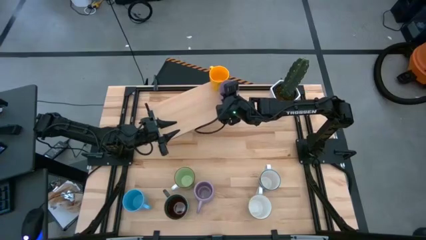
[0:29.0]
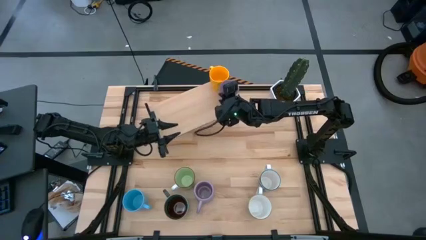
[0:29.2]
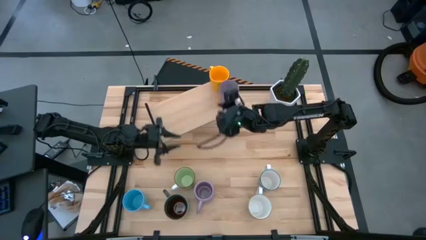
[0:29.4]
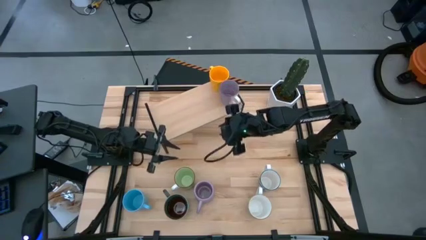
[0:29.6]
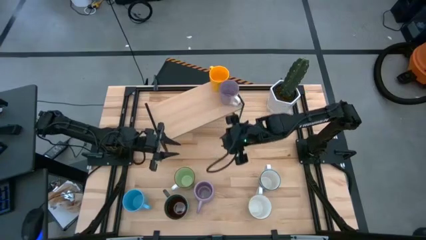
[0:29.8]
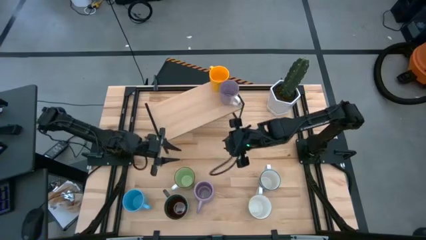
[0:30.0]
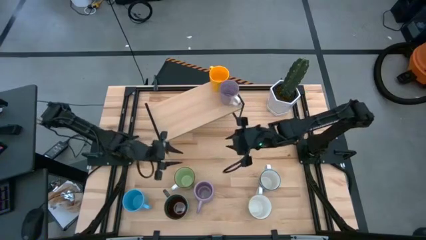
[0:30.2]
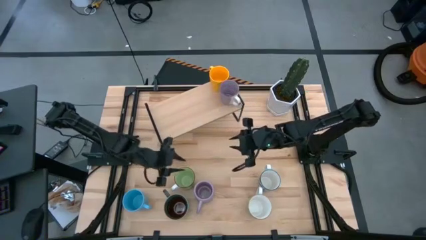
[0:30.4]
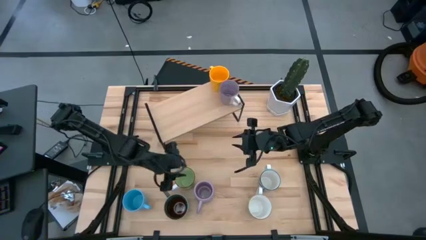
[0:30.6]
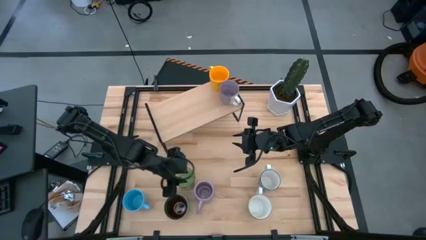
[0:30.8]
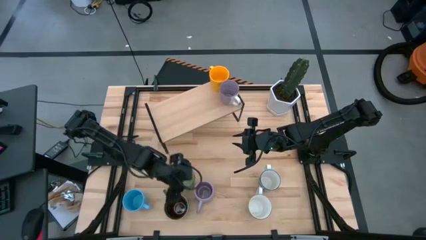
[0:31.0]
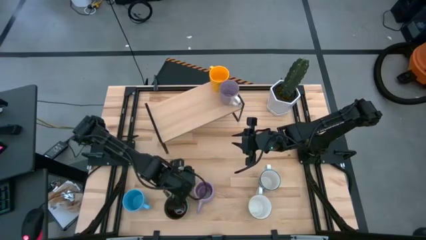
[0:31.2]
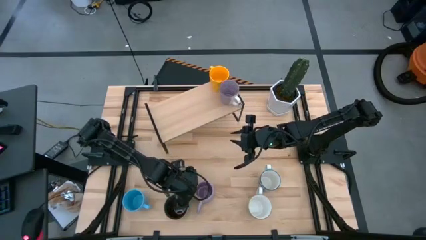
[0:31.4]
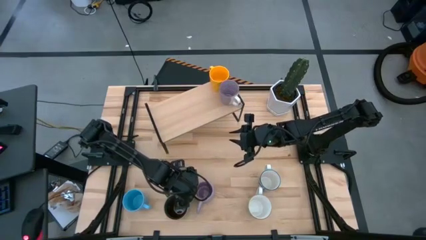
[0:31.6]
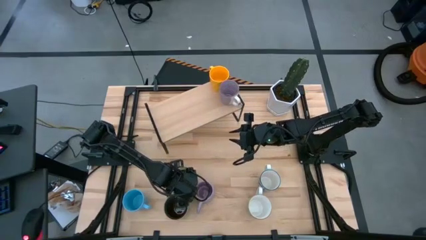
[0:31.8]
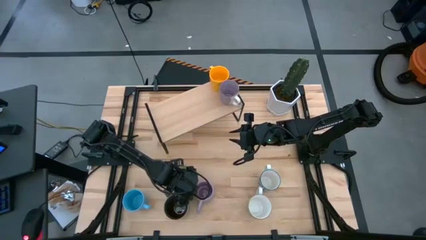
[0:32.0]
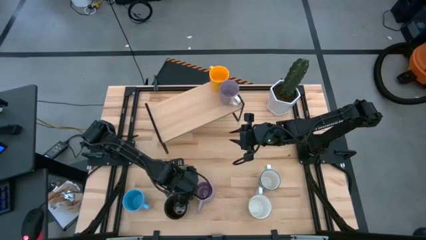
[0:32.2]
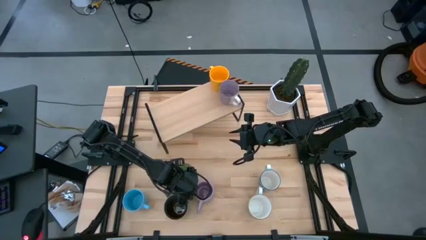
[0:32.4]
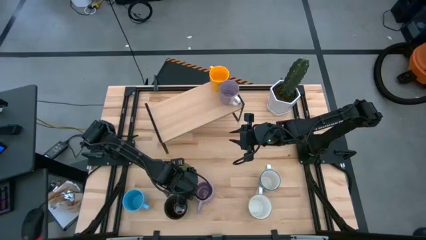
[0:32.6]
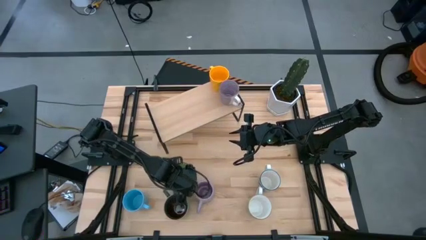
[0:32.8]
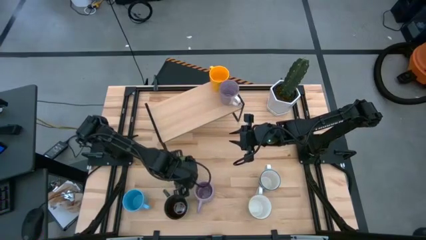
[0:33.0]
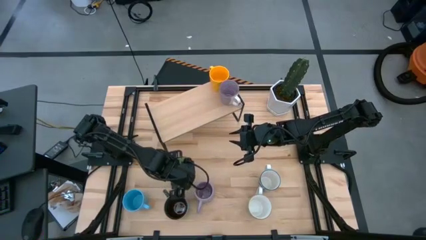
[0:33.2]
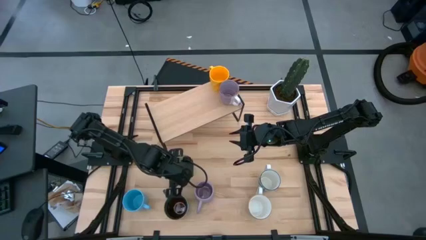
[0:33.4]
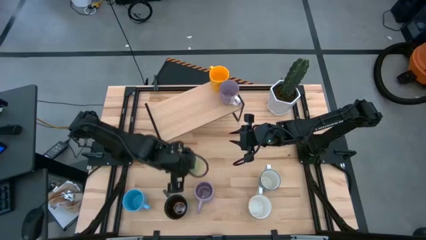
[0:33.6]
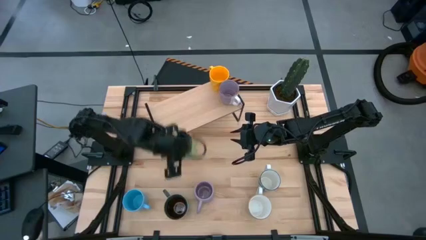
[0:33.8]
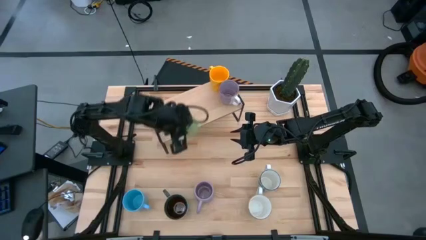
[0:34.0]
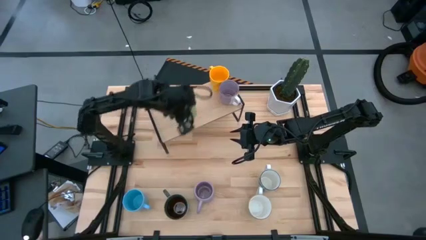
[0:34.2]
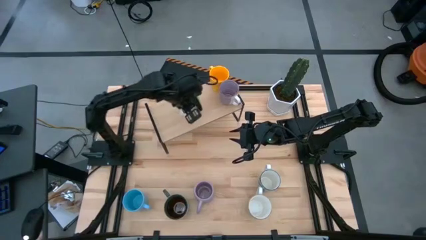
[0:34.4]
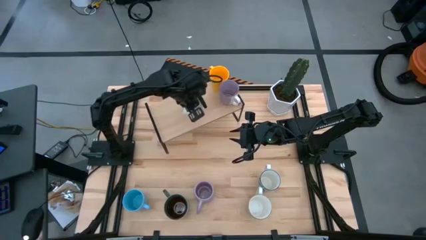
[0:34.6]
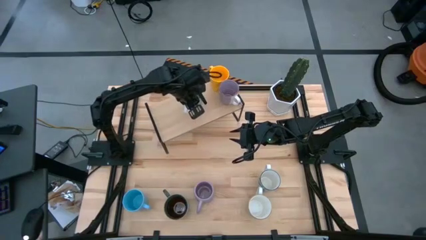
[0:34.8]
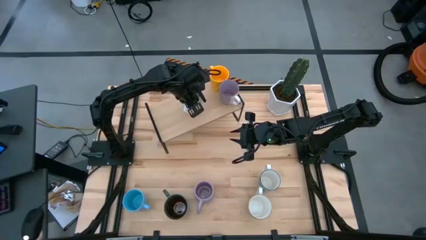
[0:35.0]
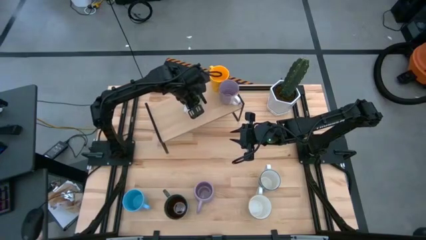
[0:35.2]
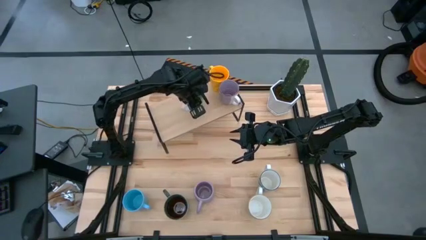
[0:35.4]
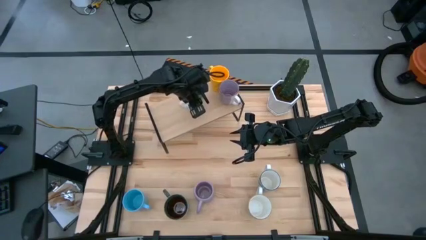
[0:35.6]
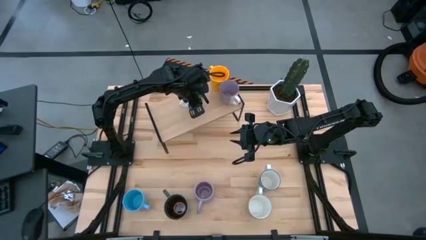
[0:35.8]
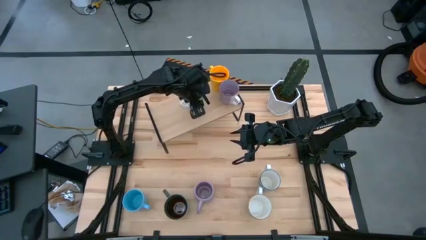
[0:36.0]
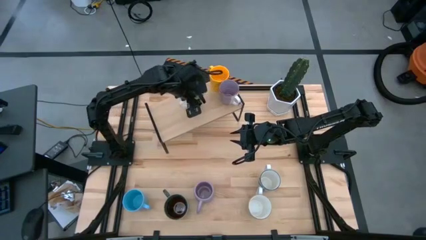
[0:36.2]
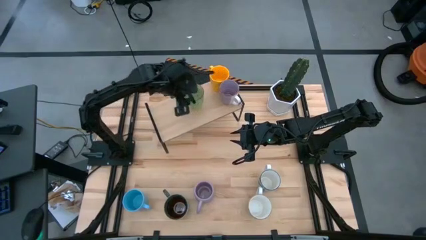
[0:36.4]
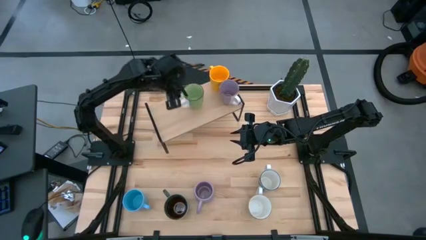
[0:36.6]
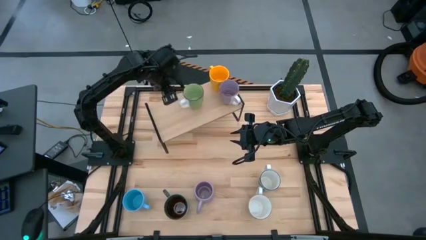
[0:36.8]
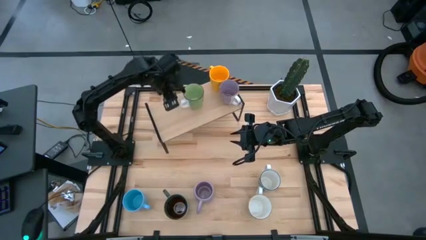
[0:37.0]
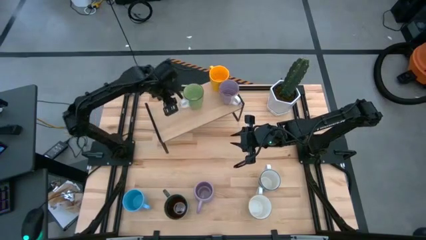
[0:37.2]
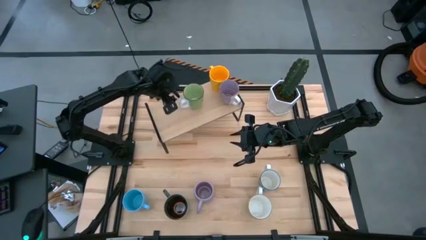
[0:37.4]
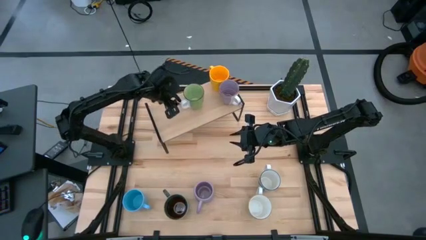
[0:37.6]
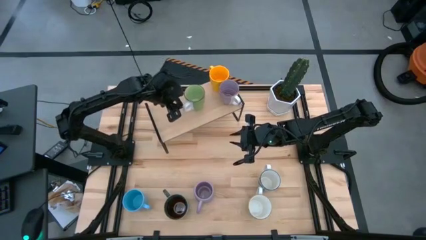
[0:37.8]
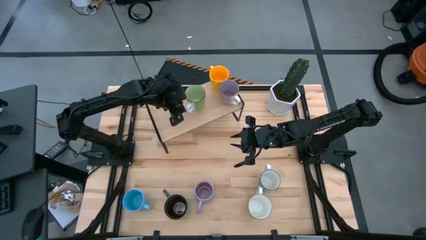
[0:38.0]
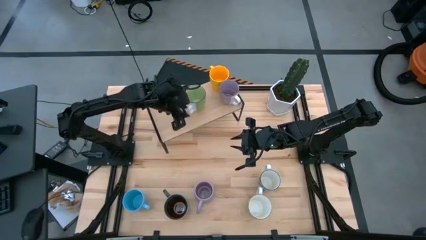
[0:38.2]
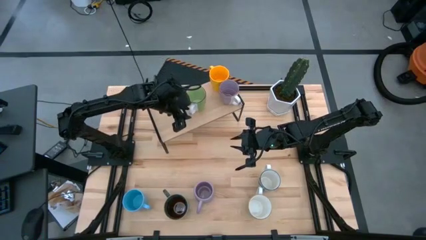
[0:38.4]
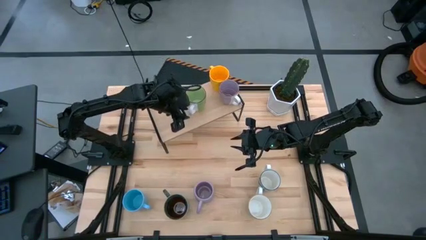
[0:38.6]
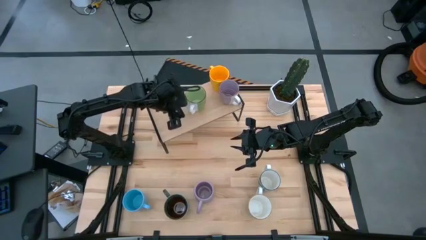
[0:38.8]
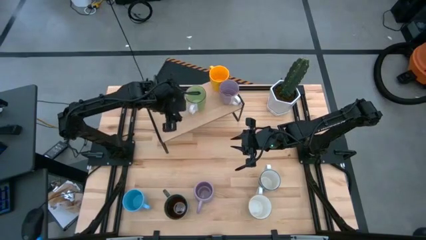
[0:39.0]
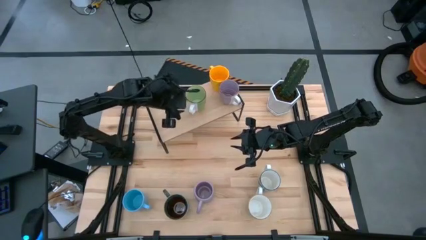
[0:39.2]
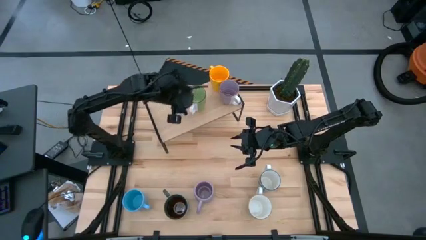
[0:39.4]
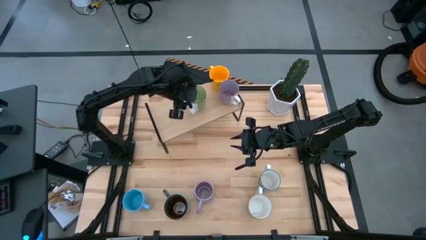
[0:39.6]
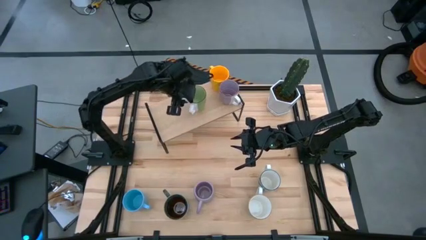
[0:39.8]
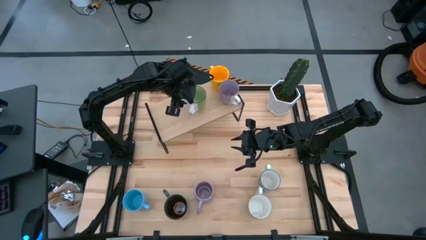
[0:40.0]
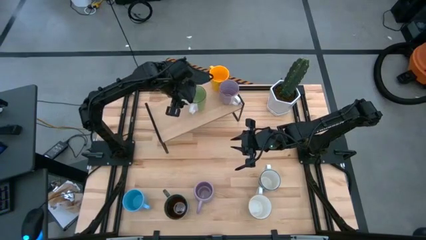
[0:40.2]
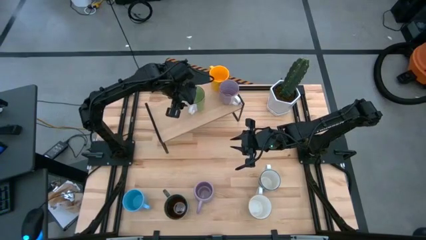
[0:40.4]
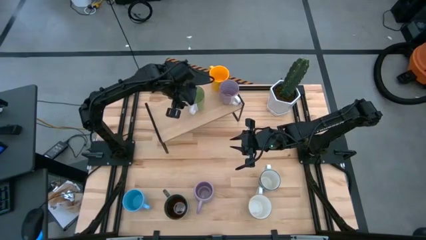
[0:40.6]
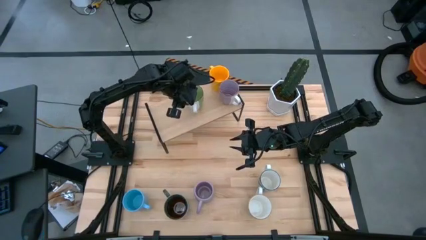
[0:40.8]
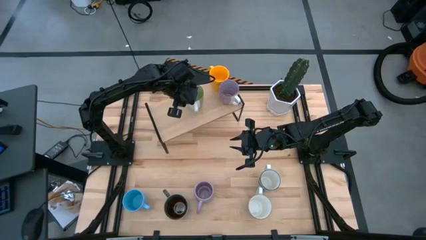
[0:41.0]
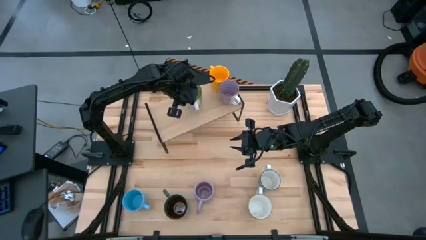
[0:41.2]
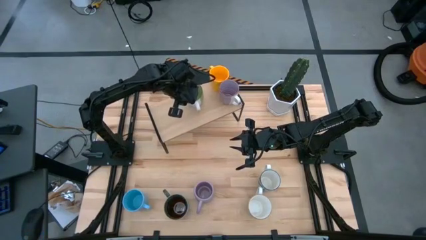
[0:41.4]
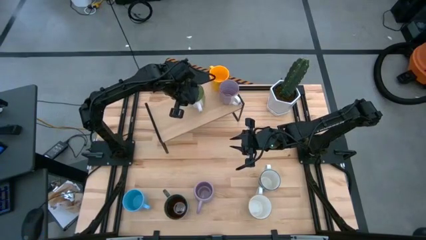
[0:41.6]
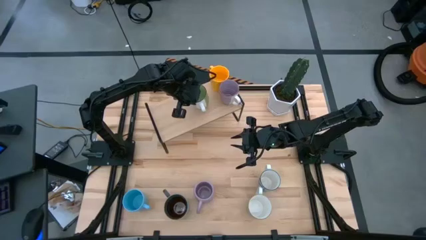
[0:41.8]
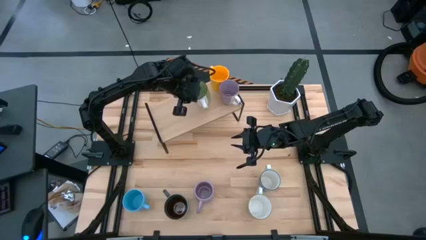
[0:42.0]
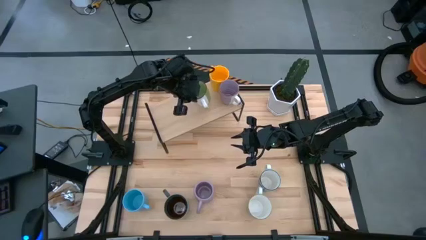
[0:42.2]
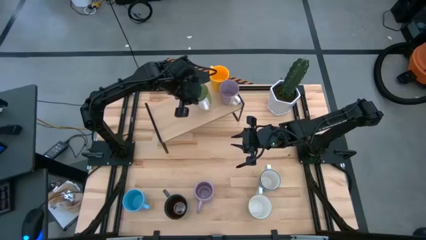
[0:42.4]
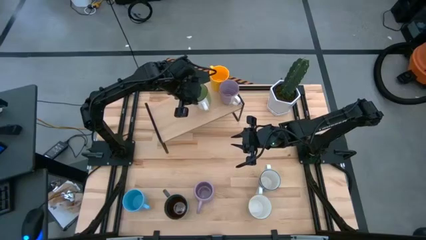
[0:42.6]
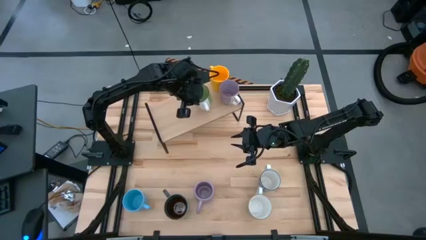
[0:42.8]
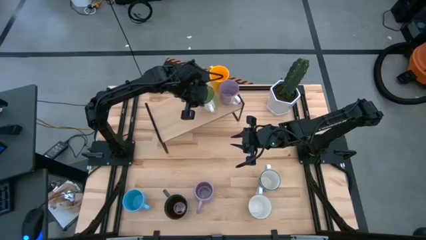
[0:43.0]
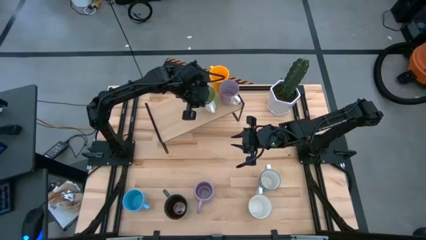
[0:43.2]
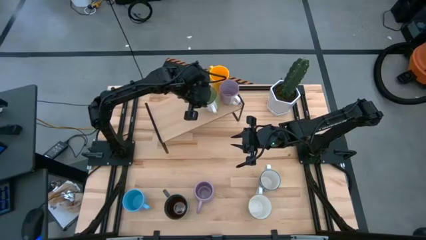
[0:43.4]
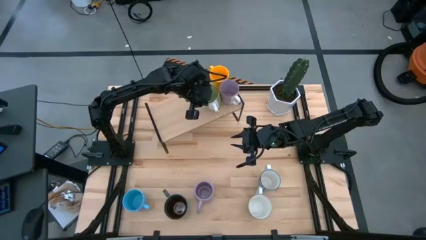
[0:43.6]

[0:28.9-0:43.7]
Task: Place coffee mugs
Put the green mug on the shelf
